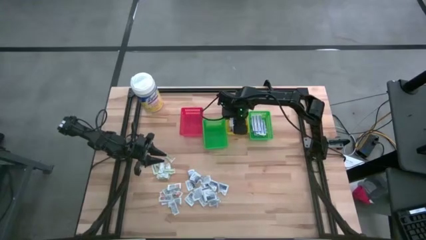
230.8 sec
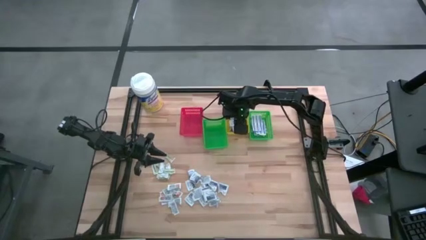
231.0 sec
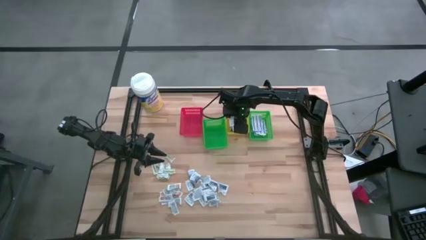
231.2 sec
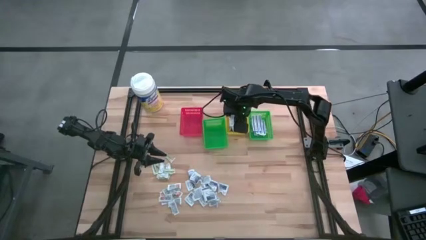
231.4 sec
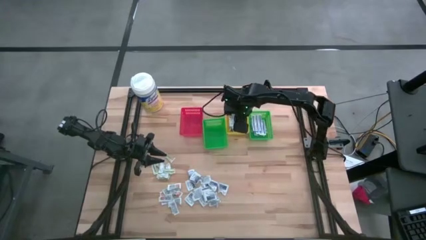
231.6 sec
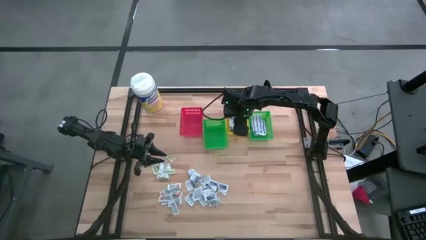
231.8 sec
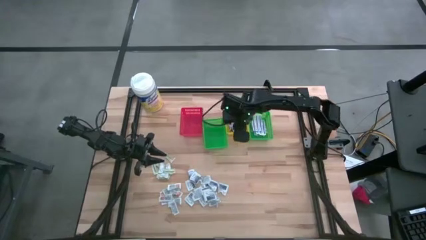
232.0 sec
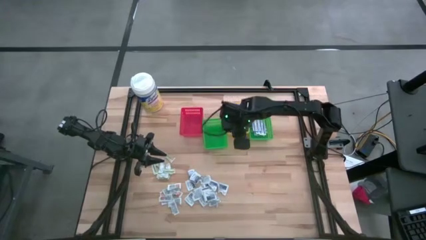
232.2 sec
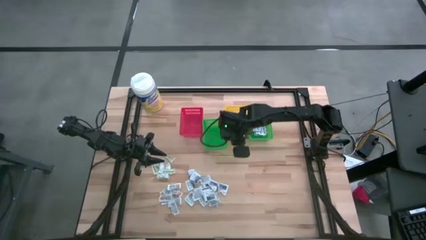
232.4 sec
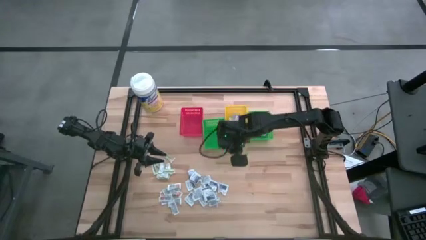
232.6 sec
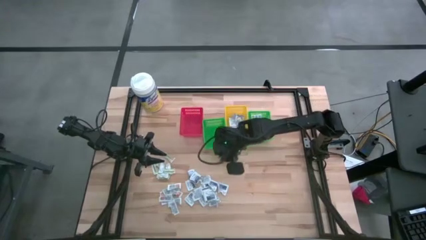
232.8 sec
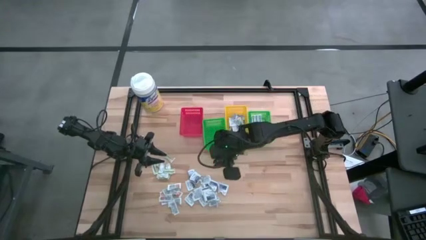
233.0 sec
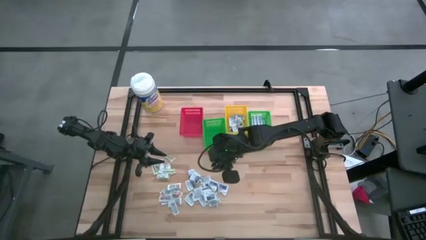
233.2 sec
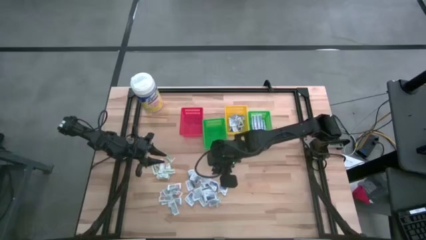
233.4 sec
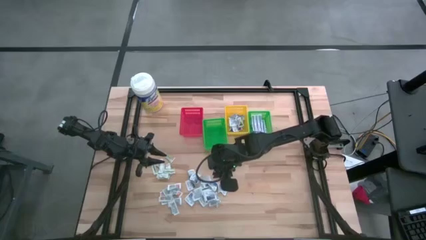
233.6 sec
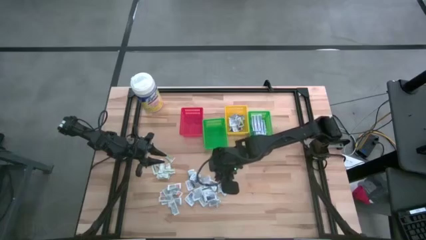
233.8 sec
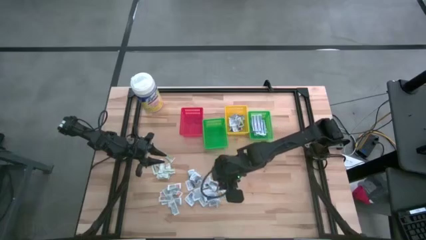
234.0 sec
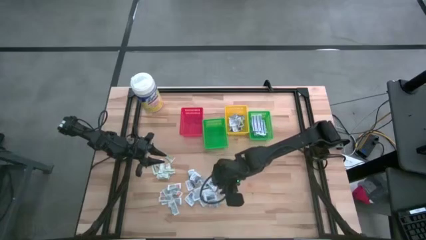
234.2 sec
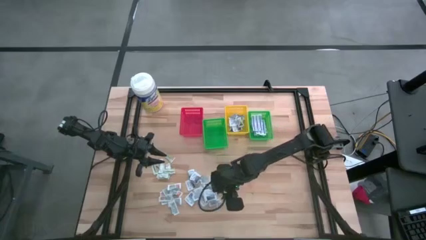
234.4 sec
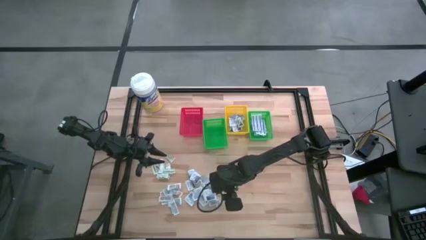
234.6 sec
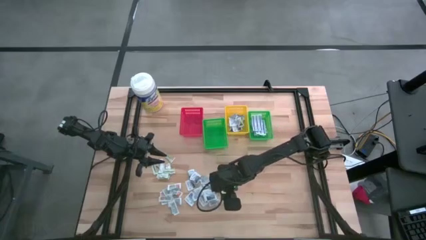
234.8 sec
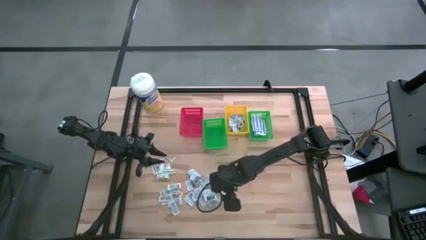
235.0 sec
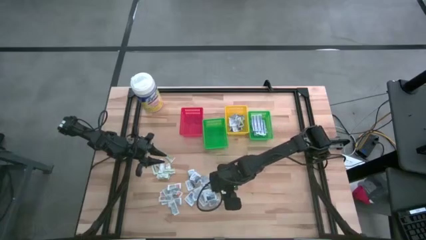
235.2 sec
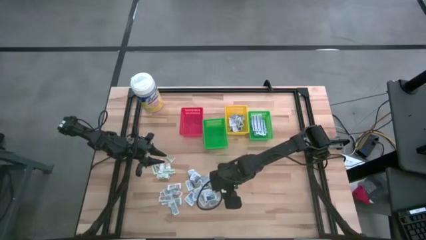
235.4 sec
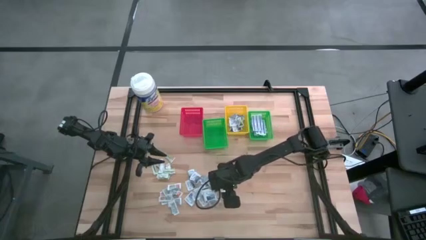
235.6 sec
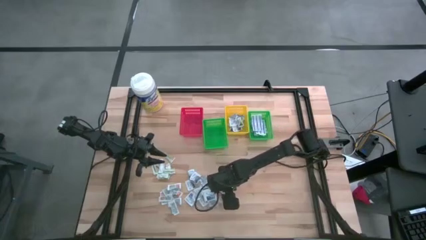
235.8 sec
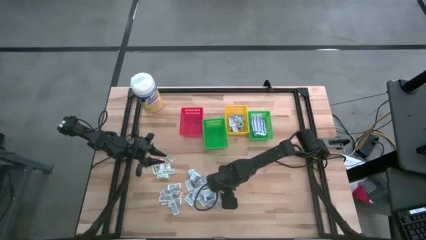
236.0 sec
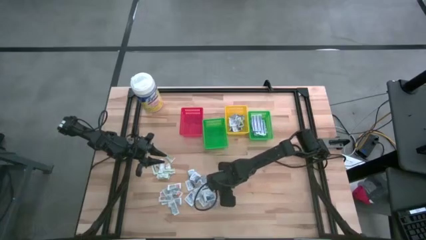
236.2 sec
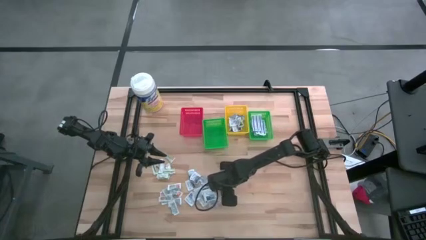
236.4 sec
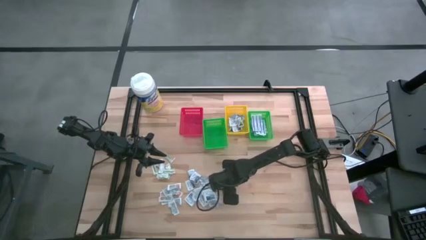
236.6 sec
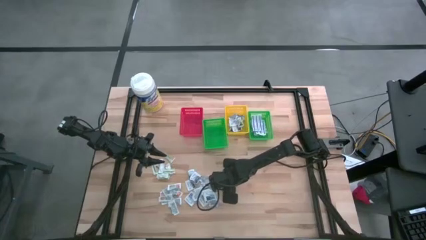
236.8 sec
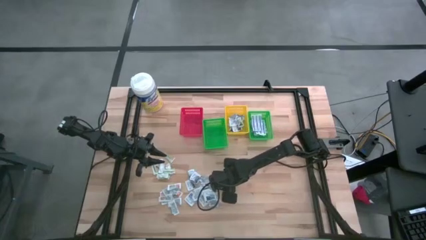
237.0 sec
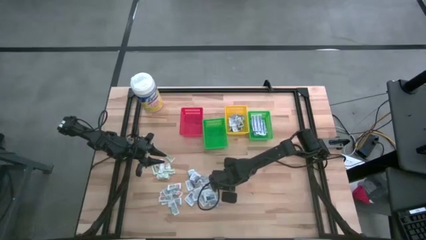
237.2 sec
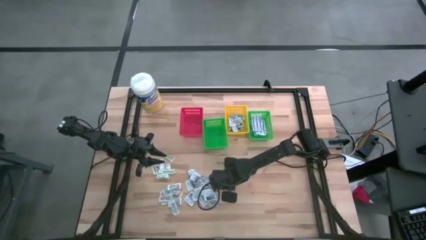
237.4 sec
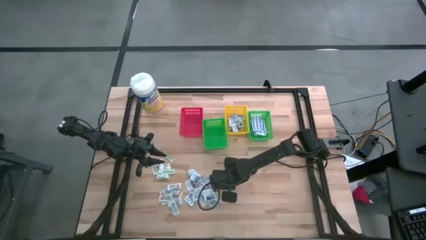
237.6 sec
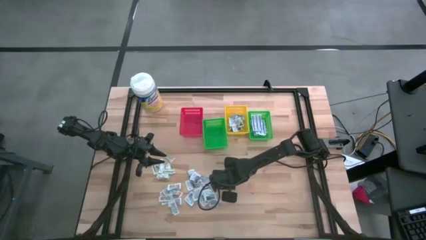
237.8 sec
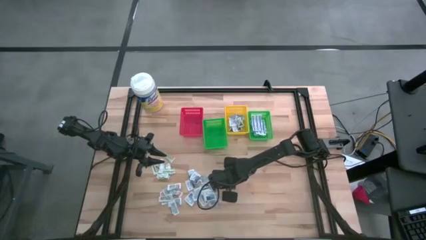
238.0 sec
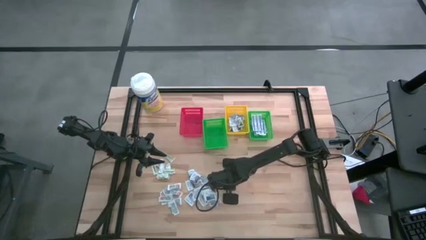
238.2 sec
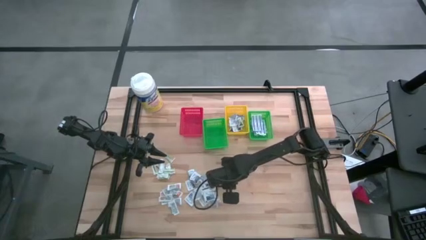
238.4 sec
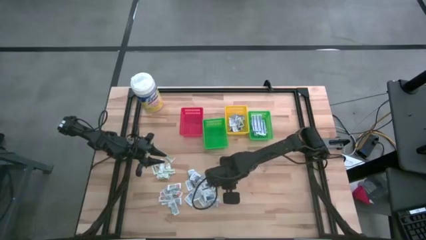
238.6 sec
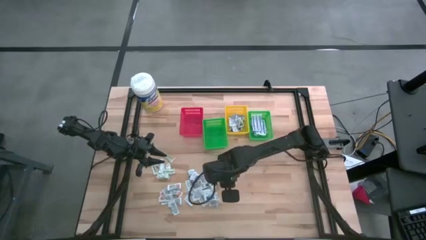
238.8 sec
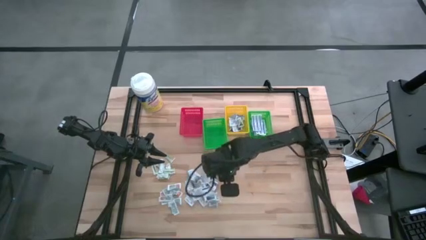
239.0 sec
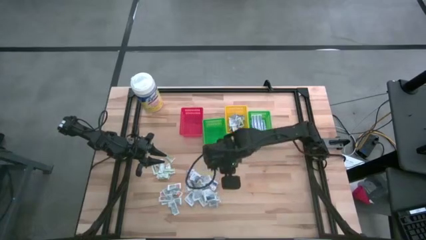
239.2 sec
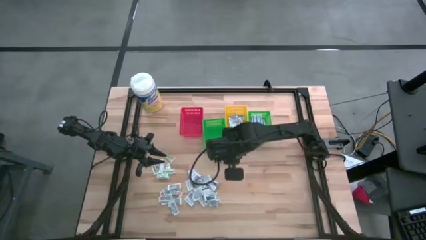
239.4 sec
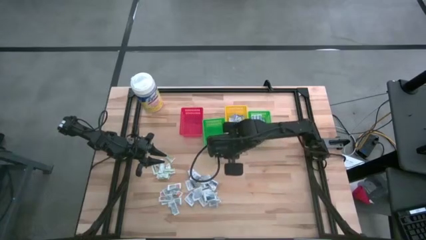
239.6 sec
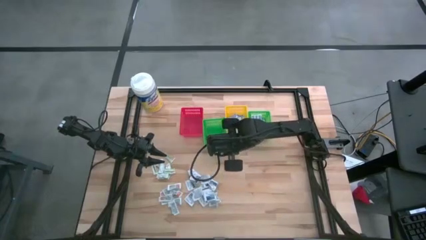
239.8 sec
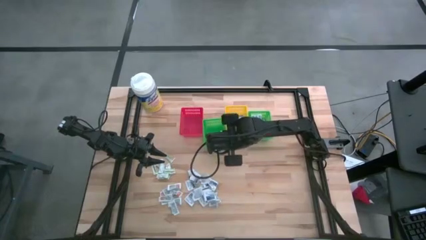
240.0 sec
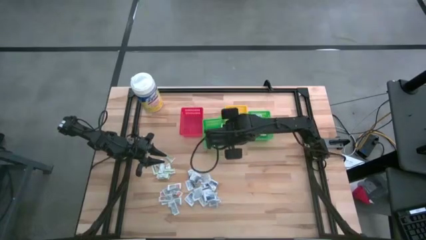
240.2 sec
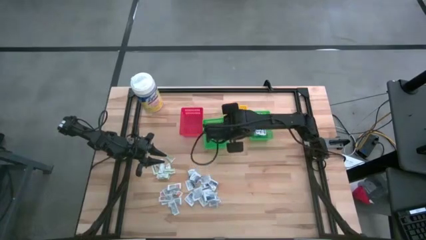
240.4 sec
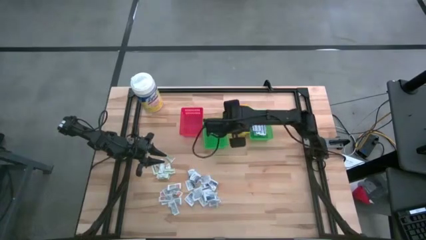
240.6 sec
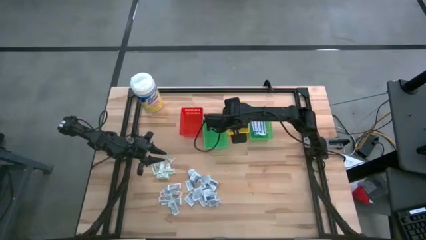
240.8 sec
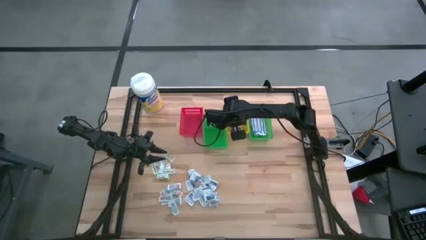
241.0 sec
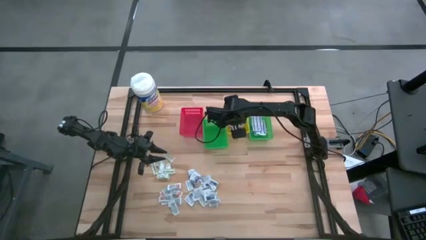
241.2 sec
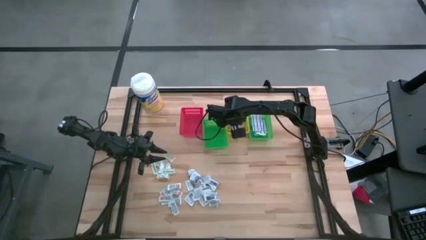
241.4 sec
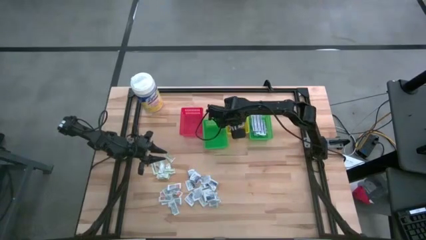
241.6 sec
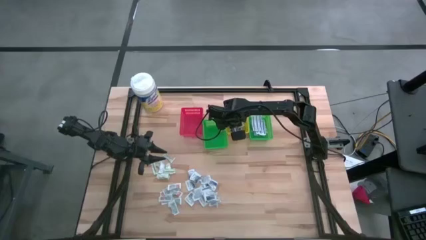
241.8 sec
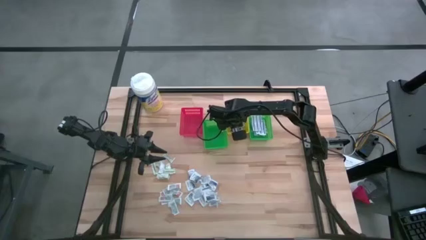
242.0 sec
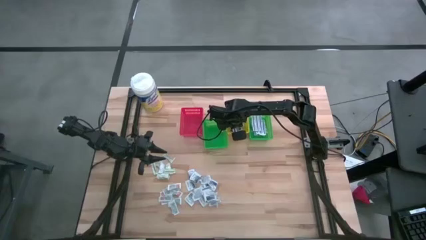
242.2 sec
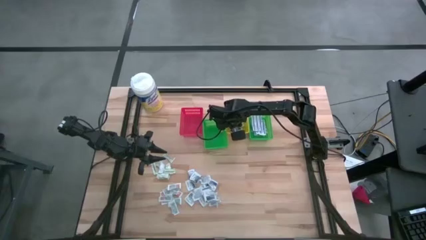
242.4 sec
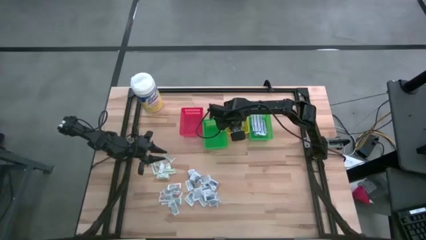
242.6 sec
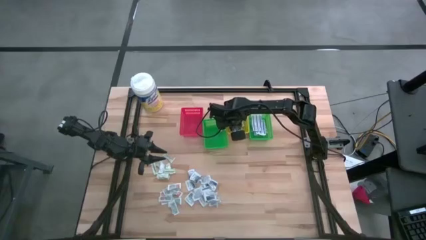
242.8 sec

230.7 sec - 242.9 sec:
Task: Pick & Place First Aid Supplies
Put the alcohol pad into the yellow basket

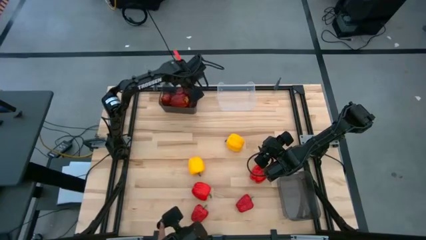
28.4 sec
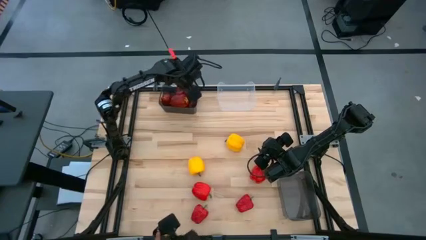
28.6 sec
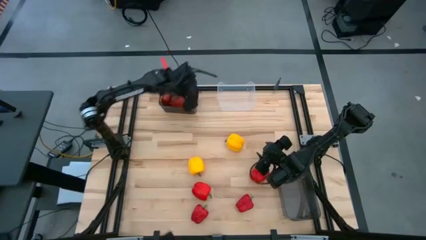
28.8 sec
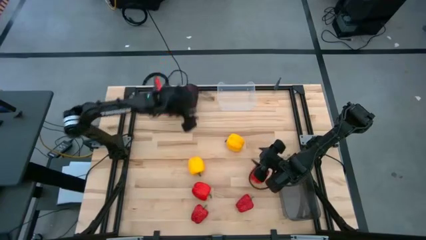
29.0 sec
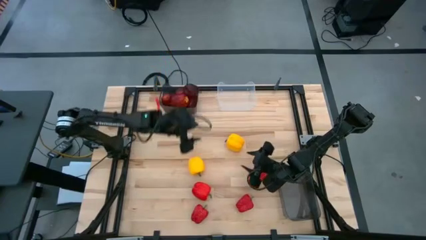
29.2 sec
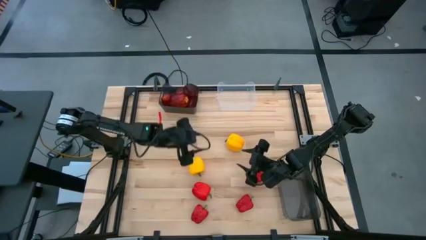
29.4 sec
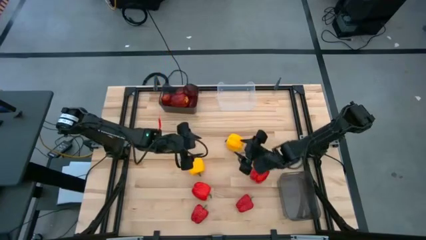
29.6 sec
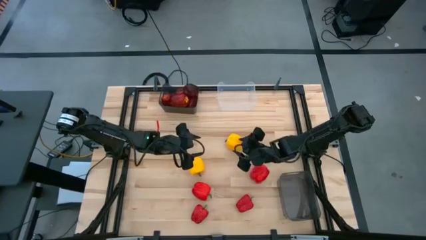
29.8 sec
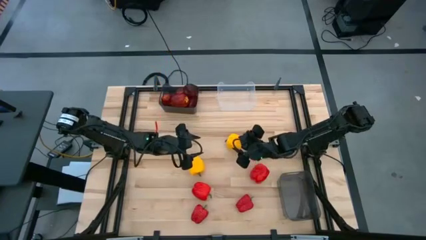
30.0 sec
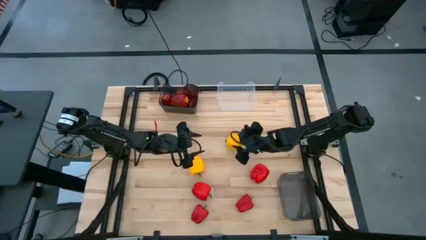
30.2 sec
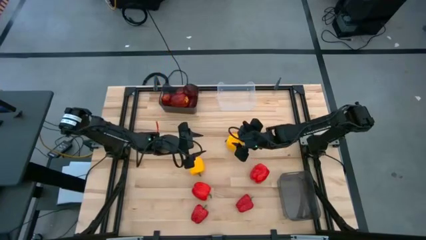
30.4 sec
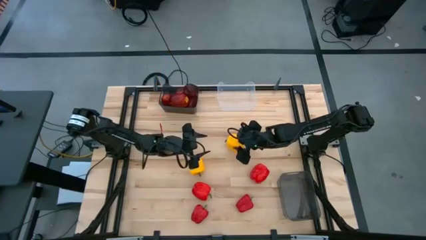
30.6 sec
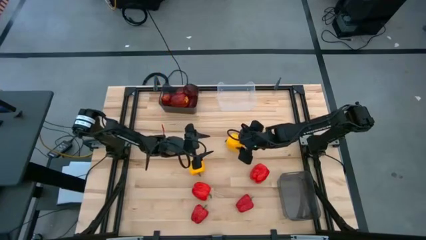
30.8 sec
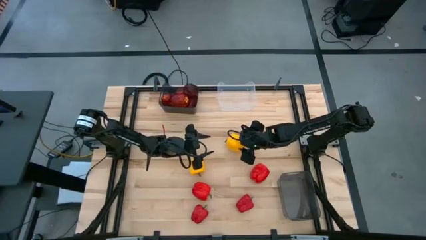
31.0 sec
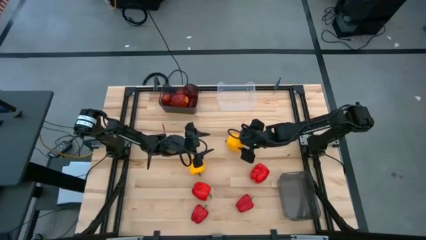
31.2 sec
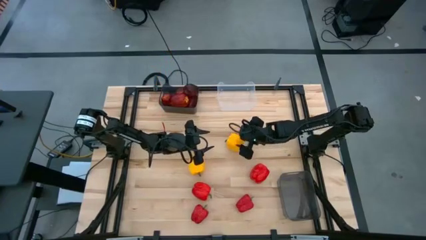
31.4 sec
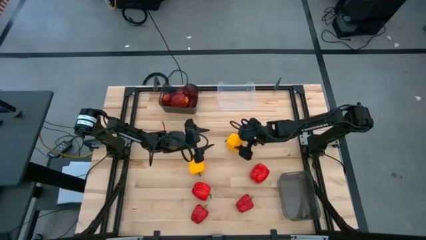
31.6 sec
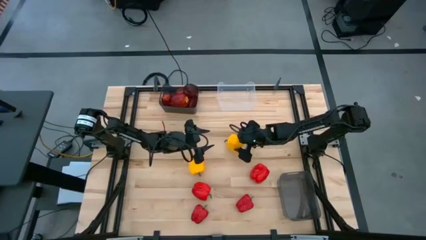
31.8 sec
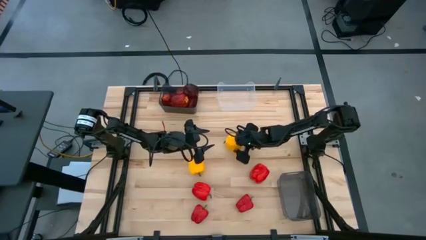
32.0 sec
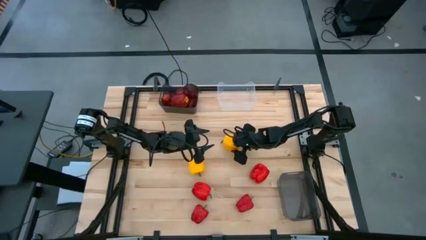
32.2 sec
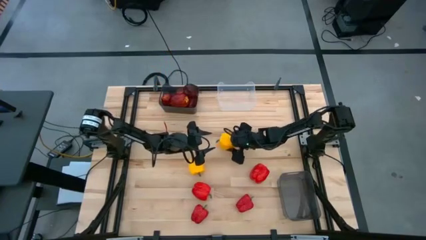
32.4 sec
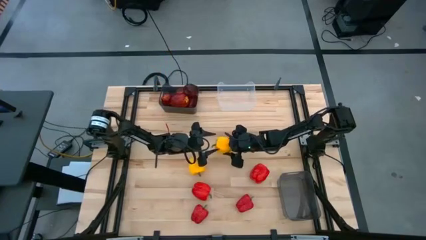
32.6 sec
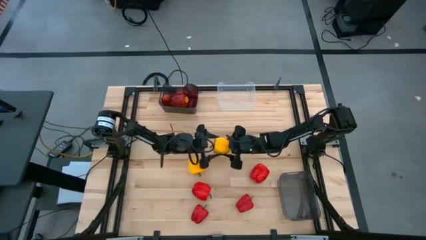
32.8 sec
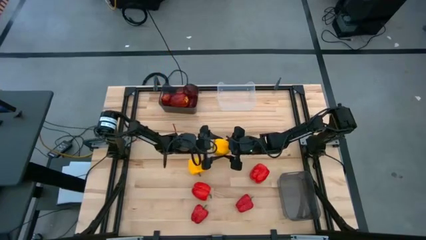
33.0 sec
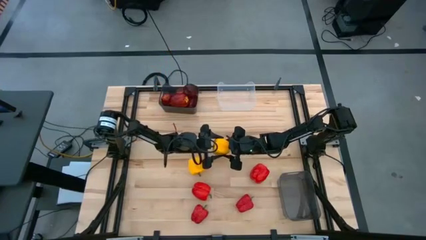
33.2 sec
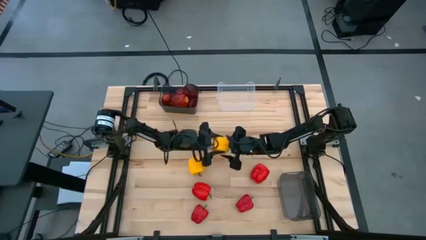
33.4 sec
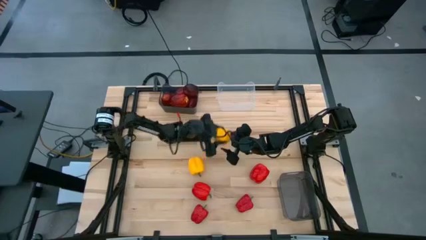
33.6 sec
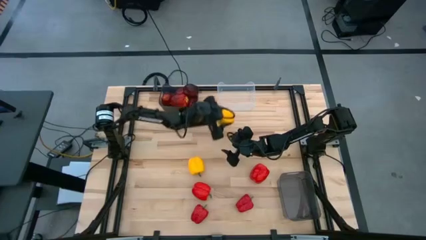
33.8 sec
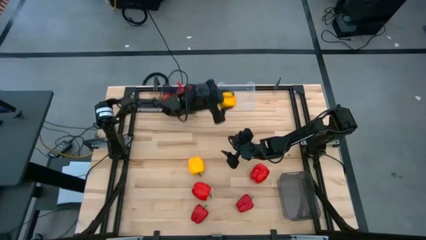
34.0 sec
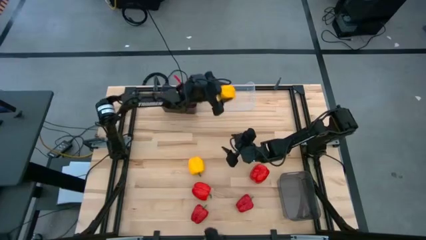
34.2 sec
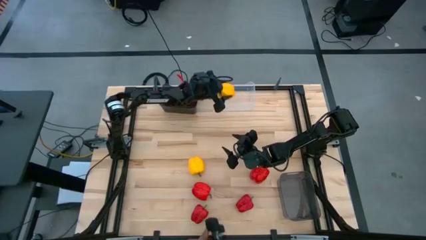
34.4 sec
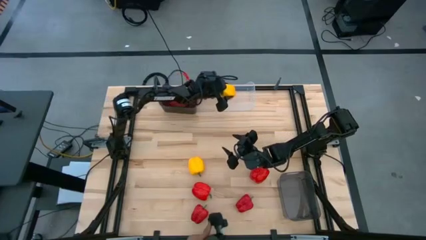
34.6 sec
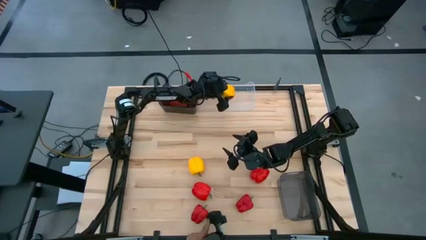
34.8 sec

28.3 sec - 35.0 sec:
Task: Sort produce into baskets
Put the yellow bell pepper into the transparent bin
